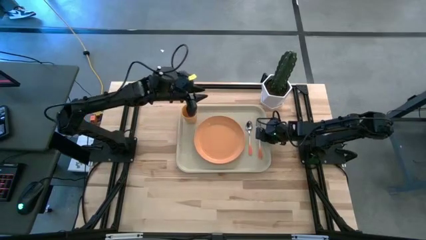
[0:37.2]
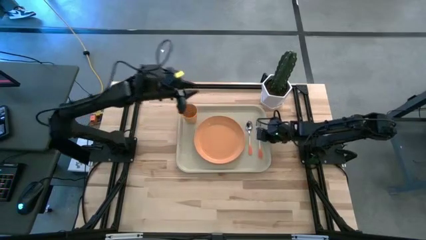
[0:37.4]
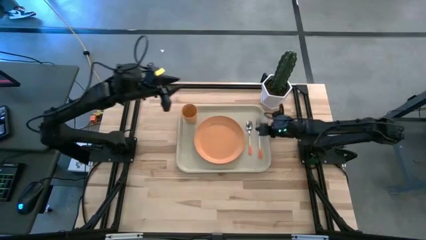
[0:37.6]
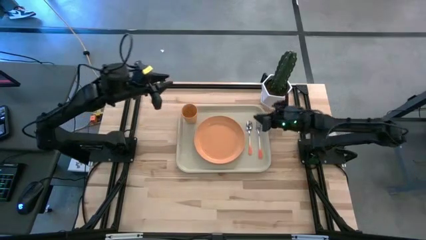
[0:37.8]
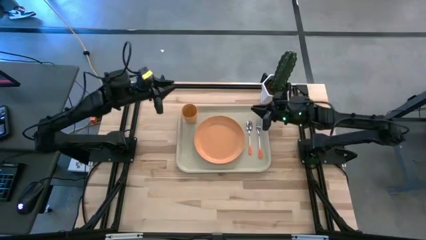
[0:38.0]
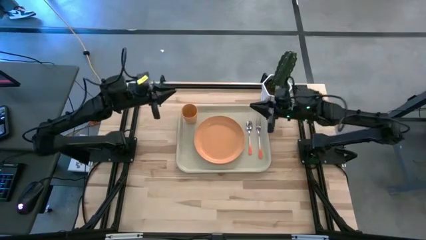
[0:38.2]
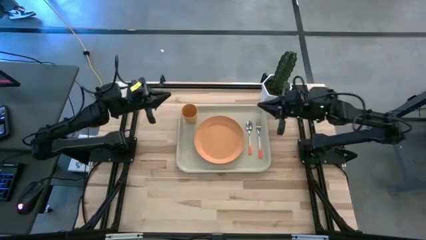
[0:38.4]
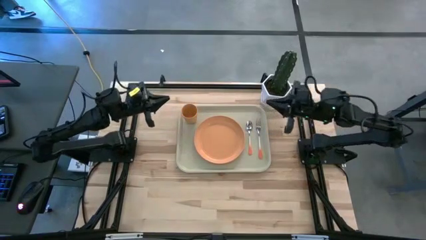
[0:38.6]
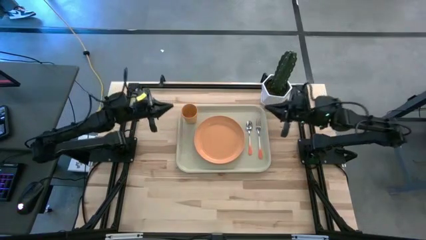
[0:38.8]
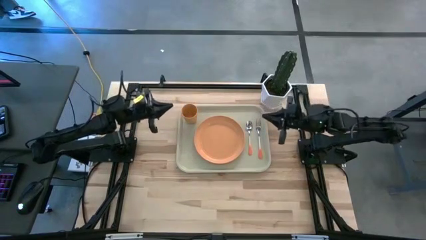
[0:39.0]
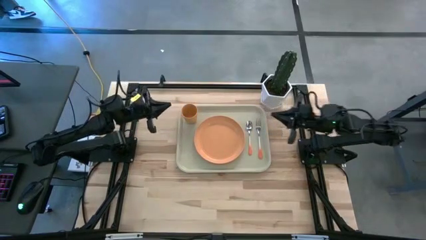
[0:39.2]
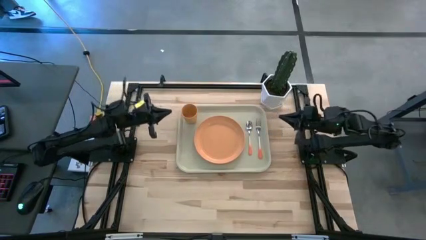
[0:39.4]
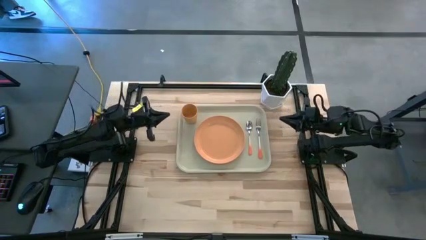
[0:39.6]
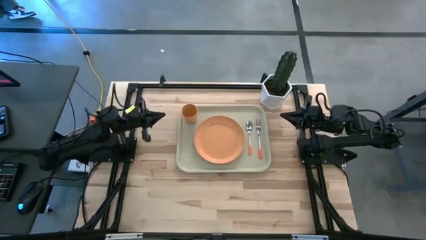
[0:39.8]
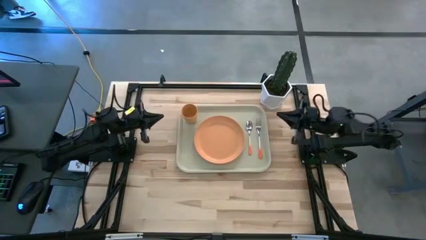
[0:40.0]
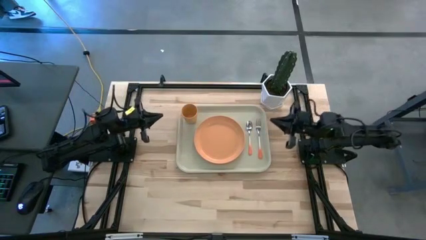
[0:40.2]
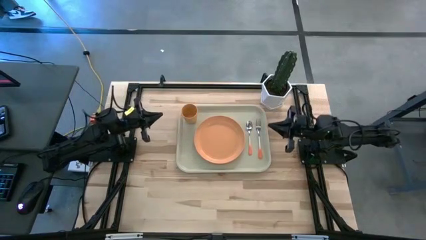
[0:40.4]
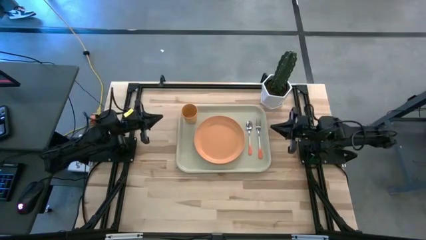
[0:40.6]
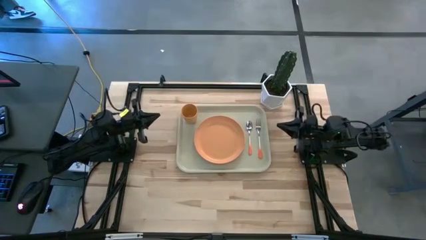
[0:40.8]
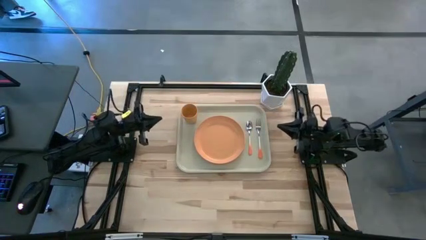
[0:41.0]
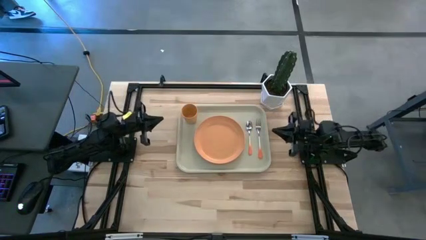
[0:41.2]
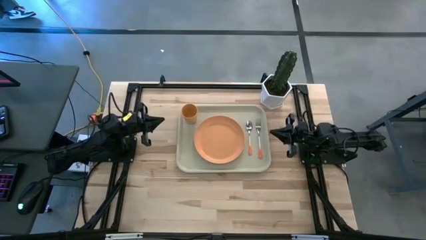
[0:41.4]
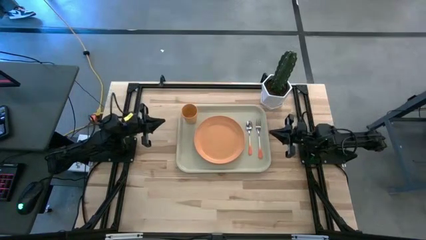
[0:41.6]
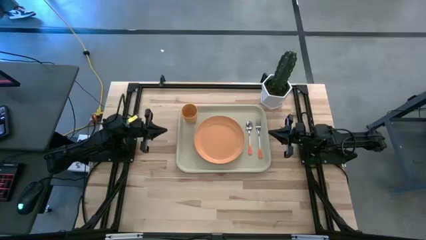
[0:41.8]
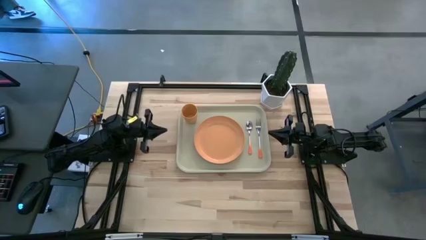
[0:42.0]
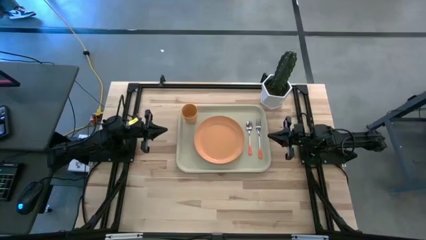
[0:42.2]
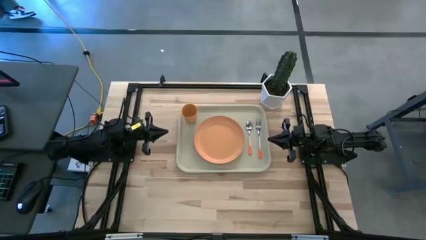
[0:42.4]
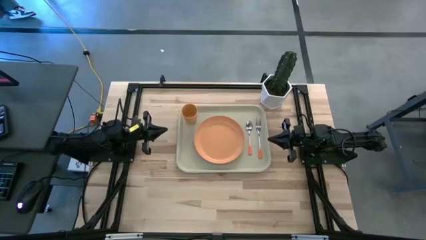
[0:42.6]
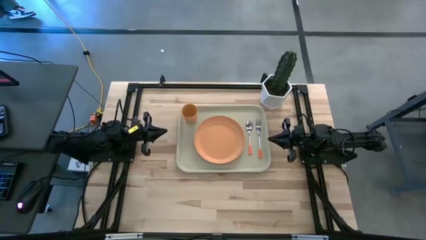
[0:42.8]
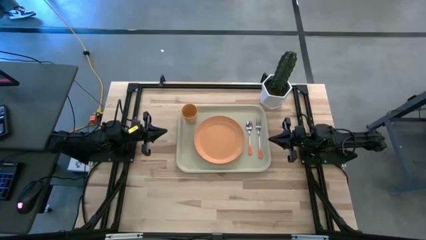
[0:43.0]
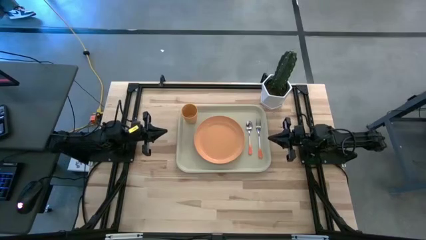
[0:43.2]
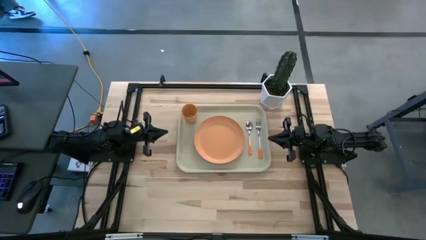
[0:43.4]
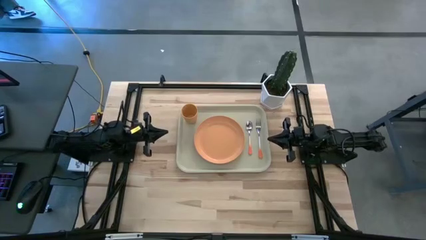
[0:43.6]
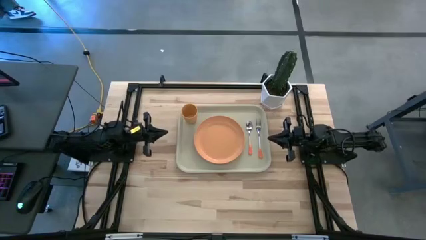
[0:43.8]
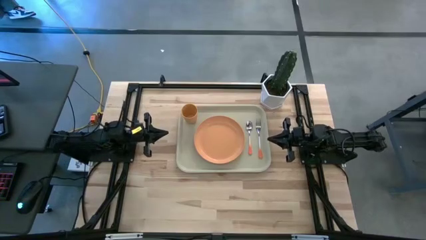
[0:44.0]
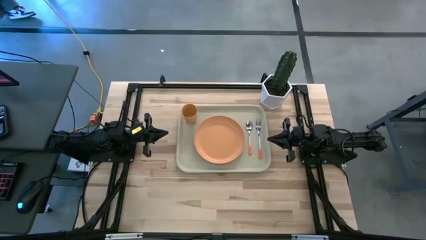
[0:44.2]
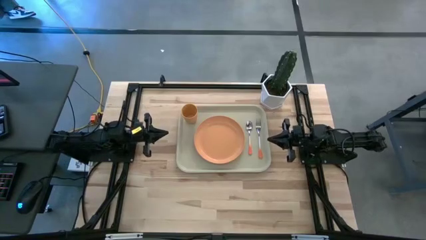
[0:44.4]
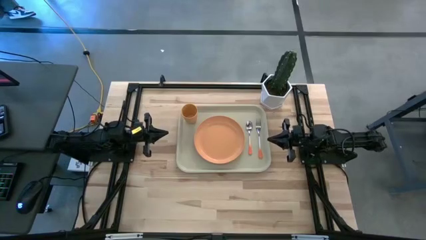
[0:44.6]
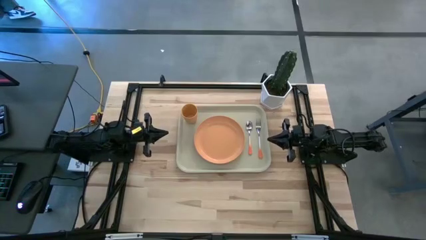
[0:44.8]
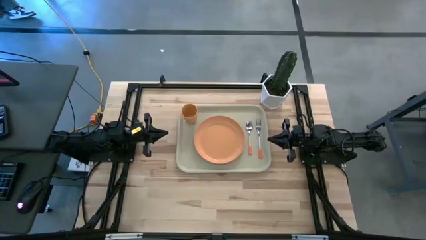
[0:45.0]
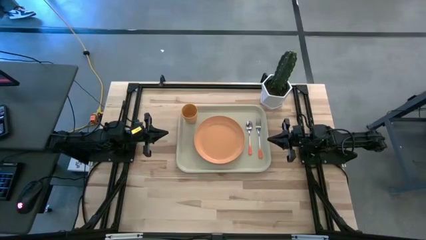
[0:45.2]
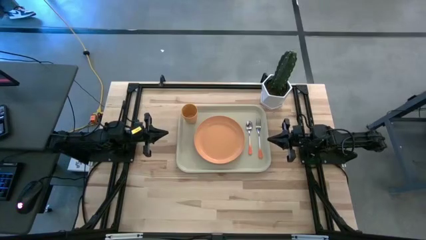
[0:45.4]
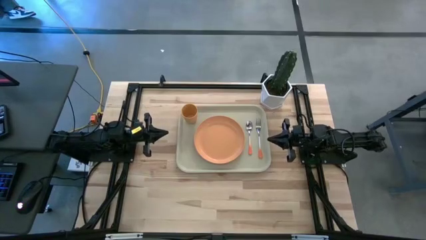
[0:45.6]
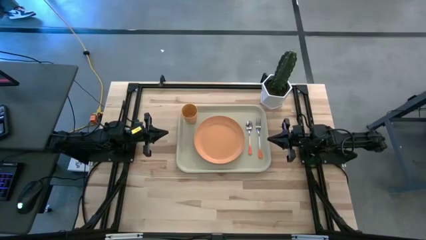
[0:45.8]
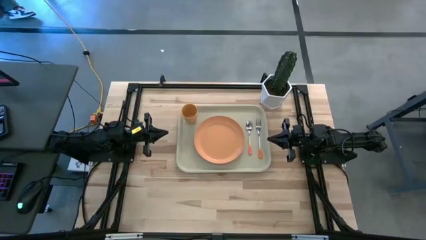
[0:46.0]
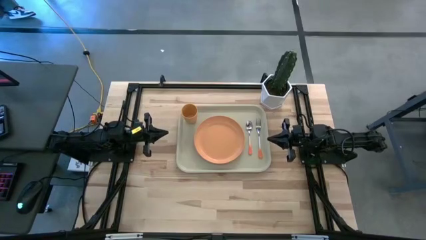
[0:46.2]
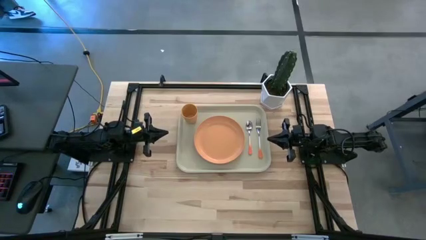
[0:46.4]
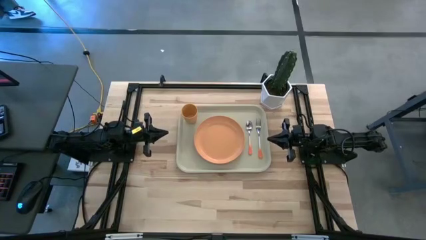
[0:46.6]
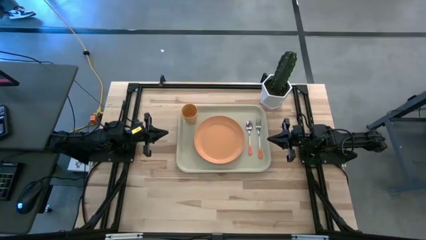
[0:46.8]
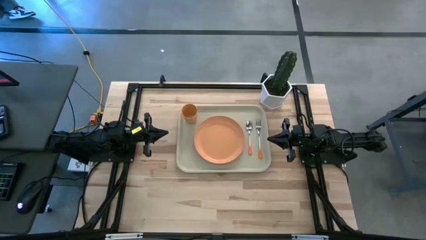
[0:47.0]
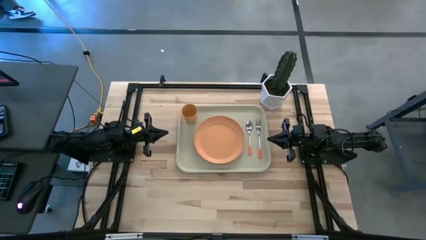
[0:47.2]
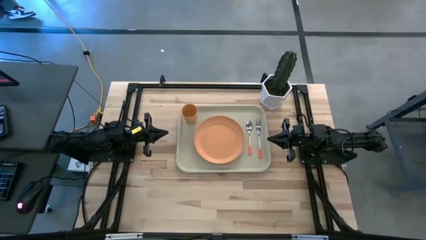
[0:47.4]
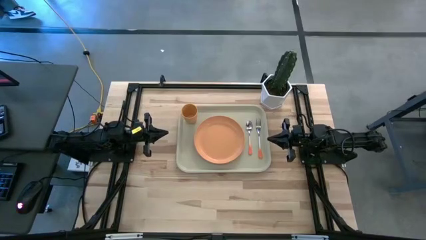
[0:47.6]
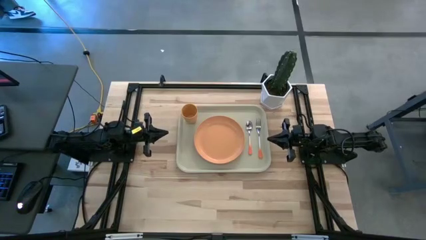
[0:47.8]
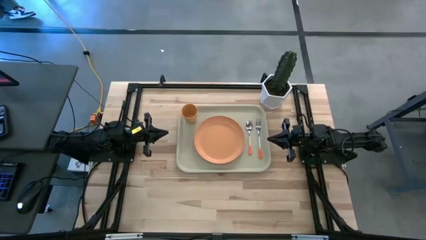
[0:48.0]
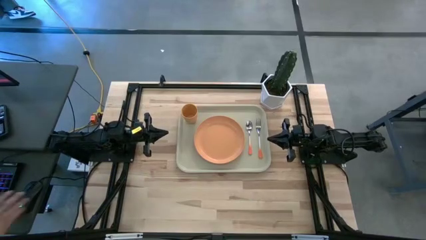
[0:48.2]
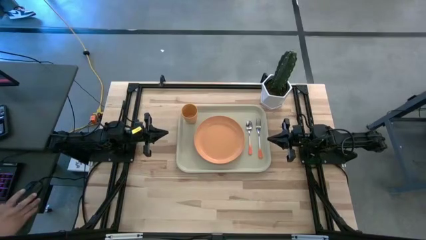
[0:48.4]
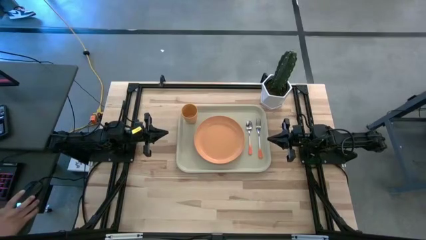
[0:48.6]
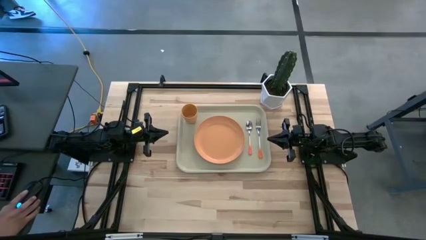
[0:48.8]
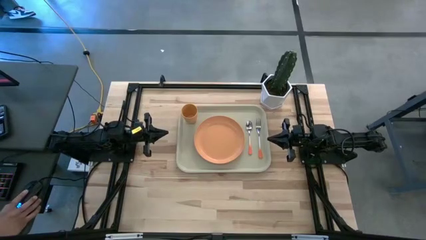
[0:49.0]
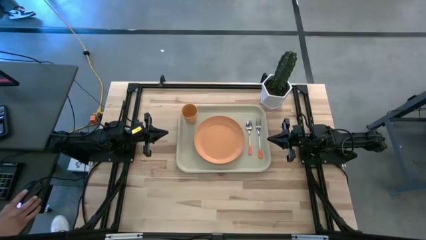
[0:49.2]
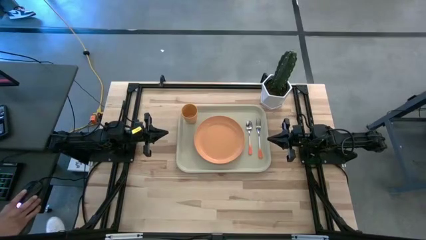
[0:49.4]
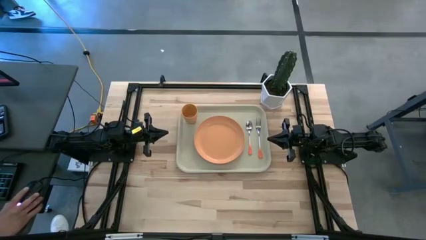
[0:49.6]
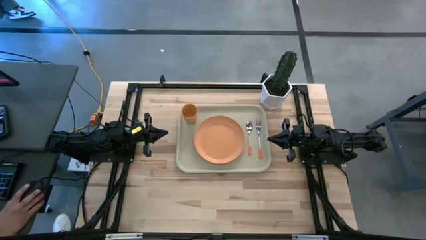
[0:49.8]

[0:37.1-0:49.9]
Task: Pick and place plate/cup/fork/spoon on tray
Return to Home Position
